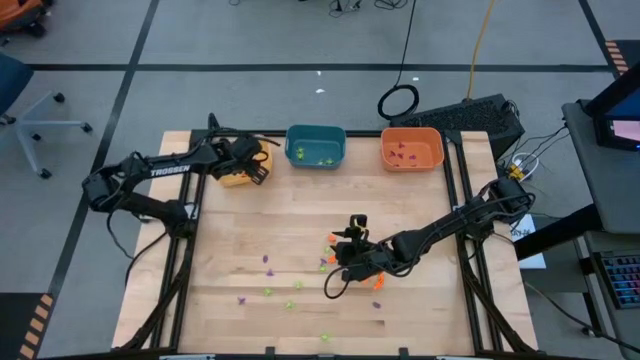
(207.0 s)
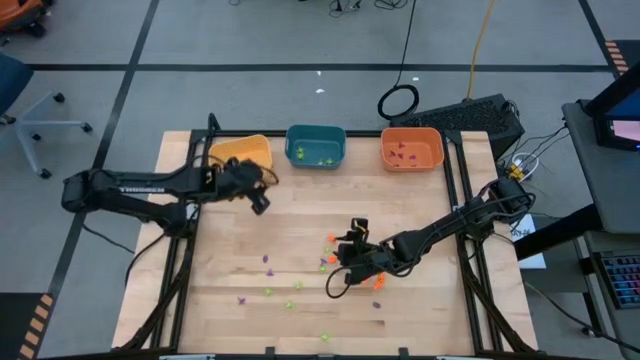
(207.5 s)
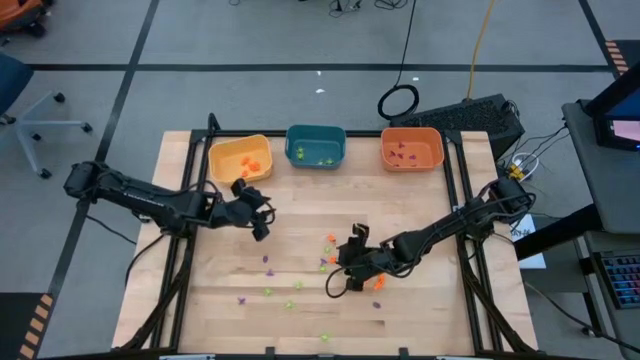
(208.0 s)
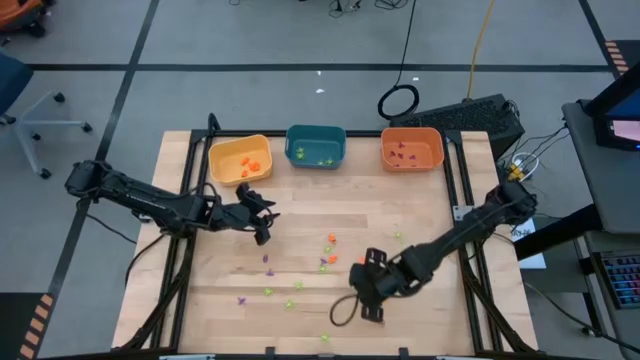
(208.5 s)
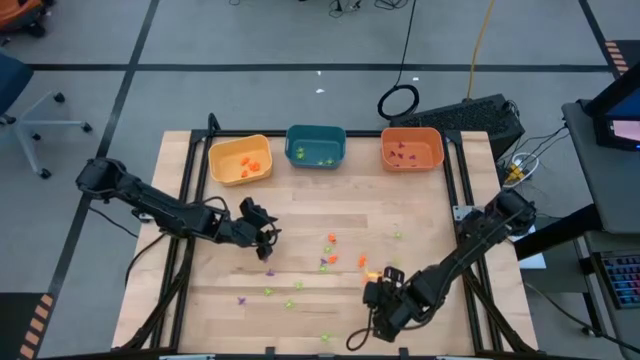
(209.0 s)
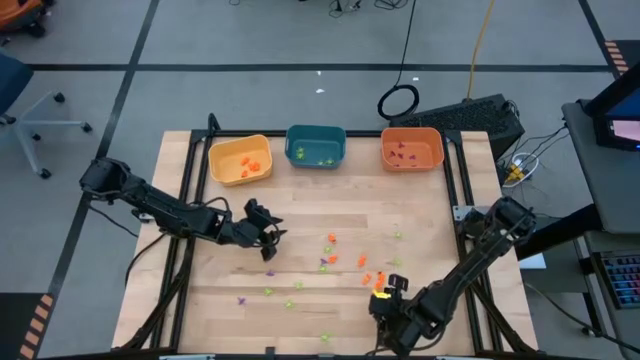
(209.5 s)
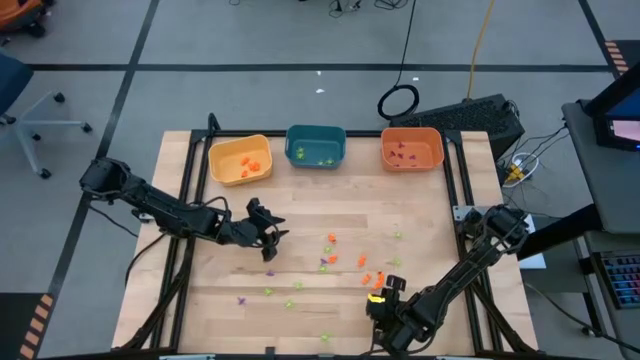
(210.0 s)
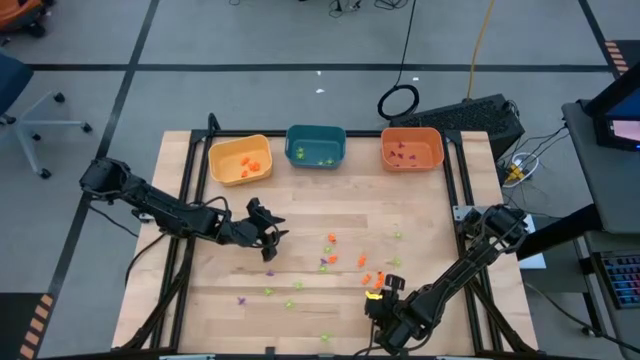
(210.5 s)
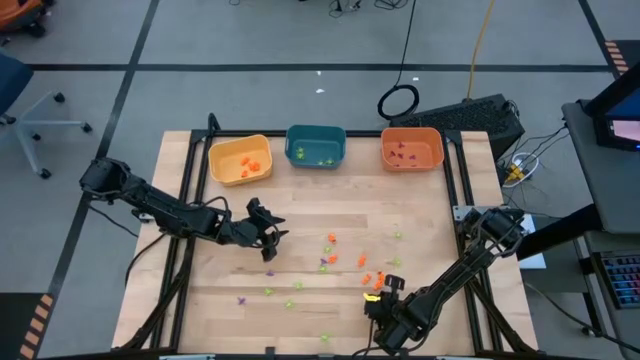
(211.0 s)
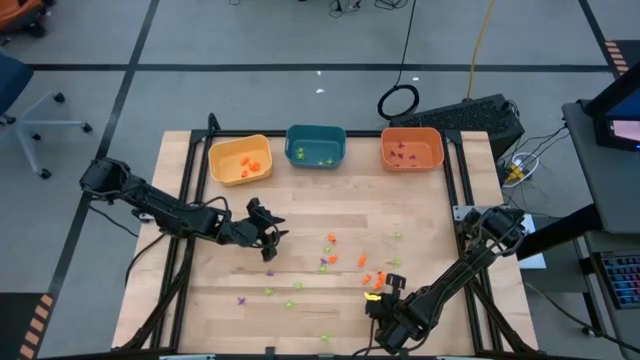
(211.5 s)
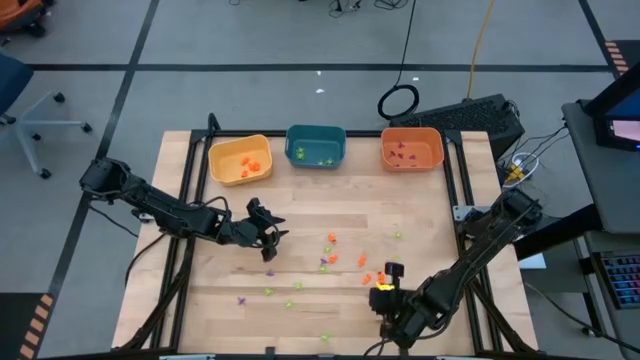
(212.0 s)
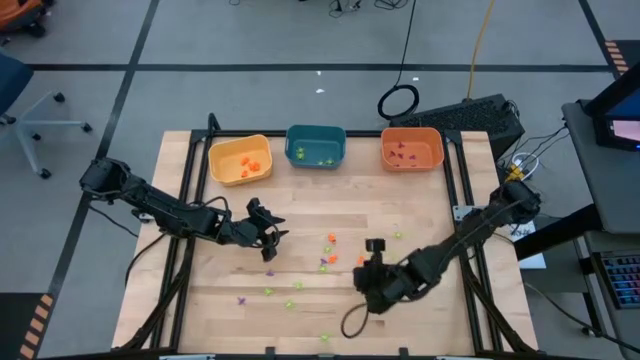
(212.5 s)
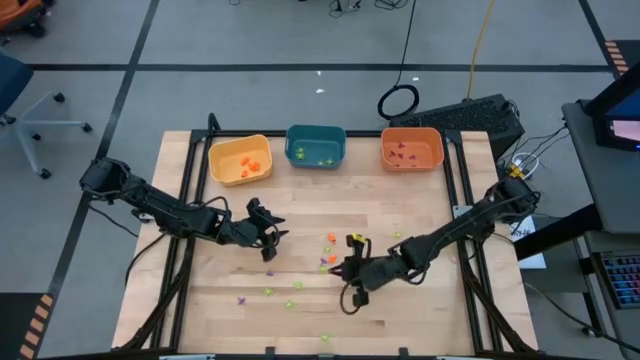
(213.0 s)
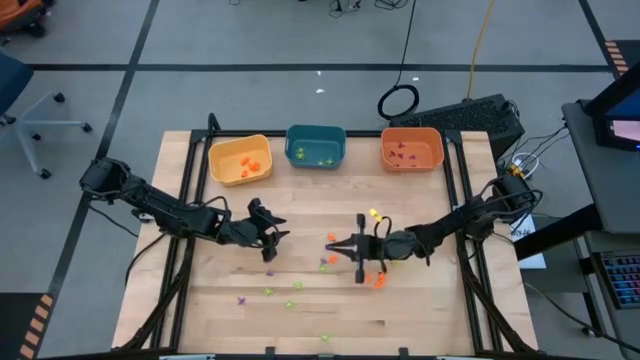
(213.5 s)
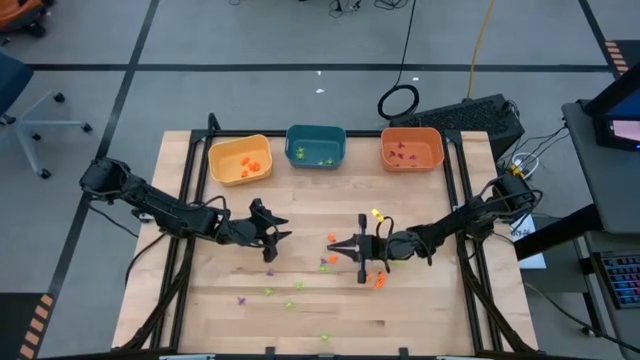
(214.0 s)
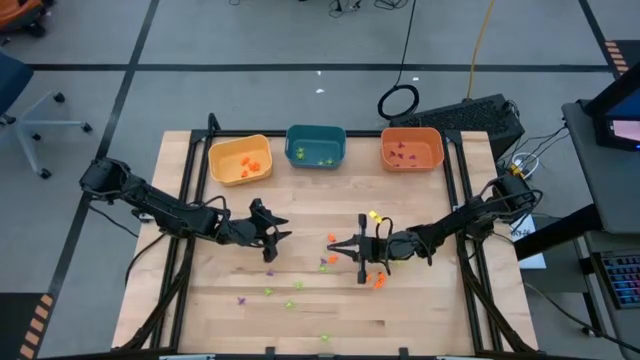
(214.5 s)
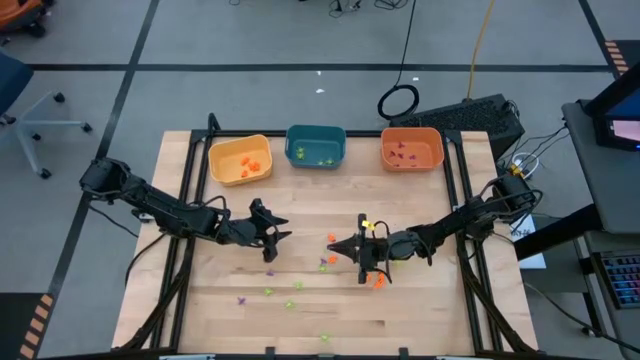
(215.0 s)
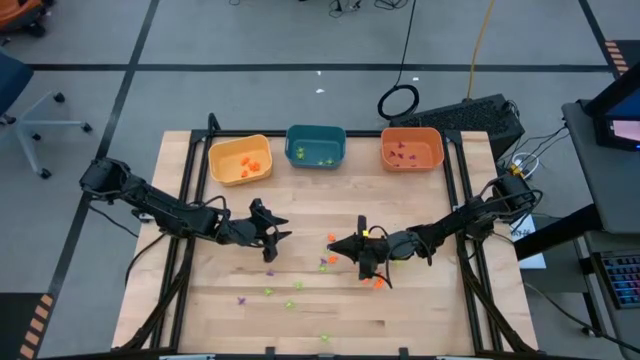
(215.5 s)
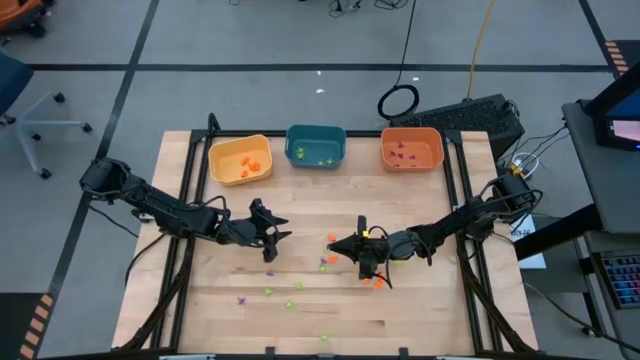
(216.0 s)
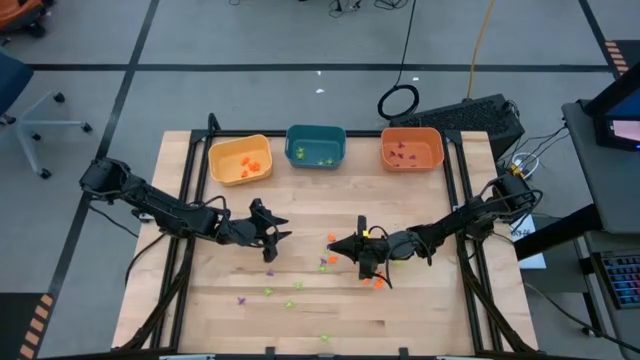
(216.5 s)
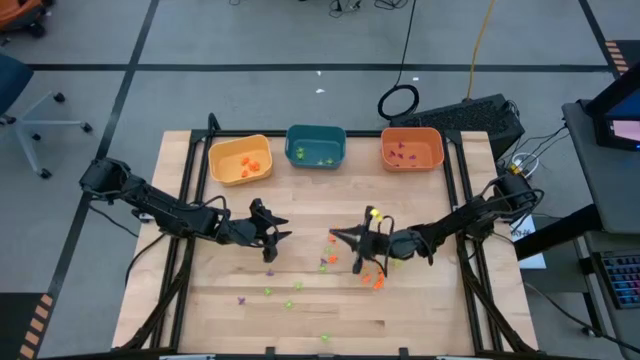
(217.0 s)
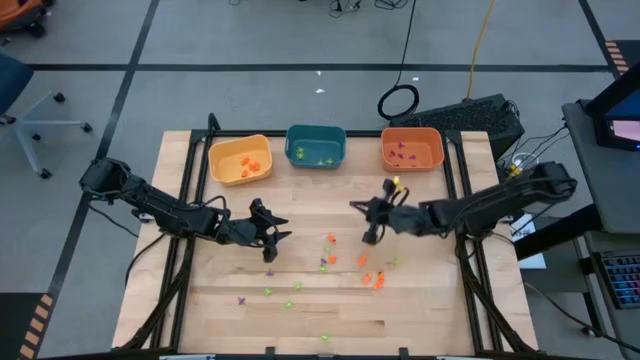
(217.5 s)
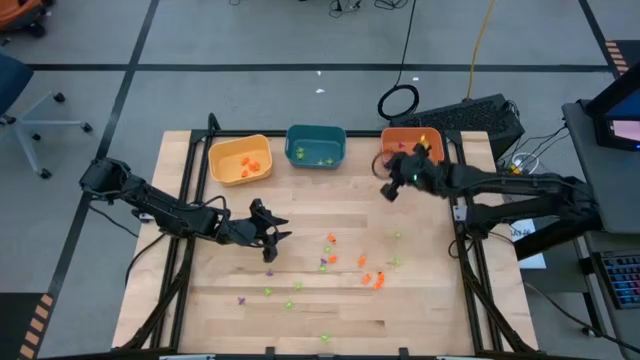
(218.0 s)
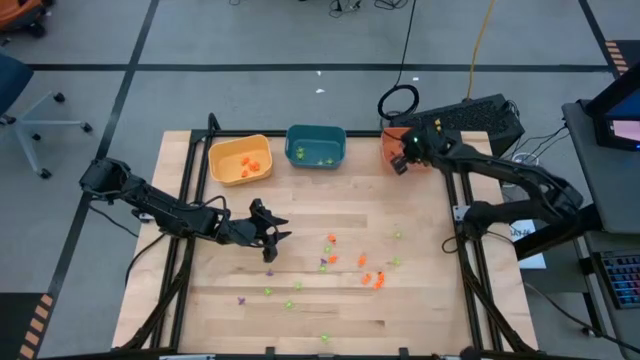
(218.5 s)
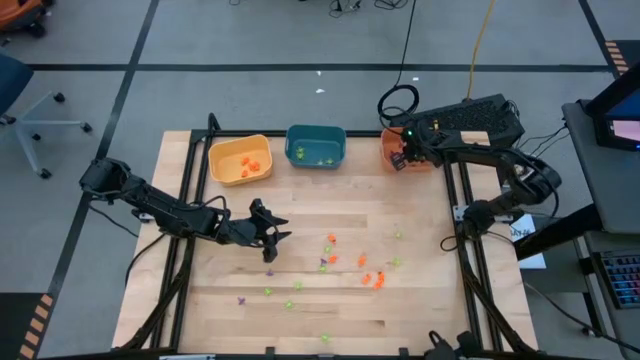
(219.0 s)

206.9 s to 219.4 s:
Task: Sort Halloween decoration
Put the violet witch hat toy into the orange bin

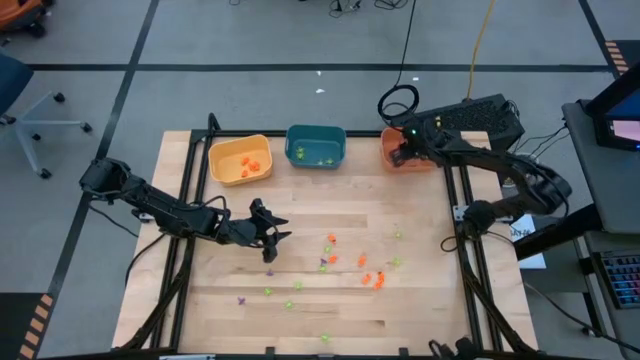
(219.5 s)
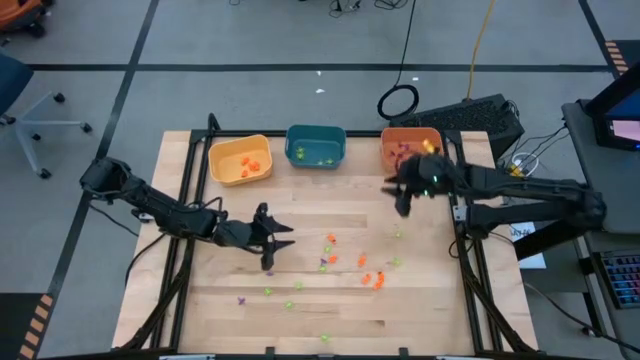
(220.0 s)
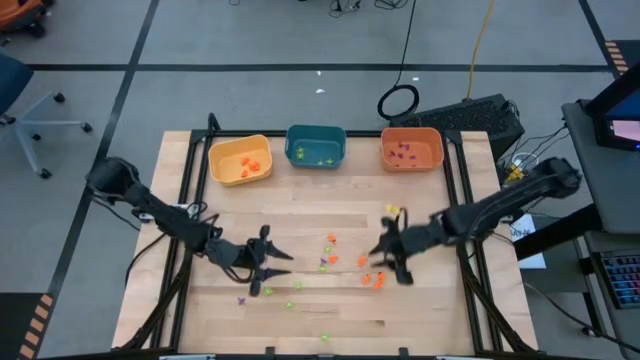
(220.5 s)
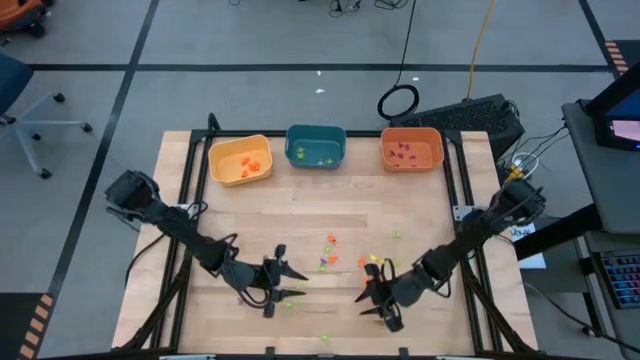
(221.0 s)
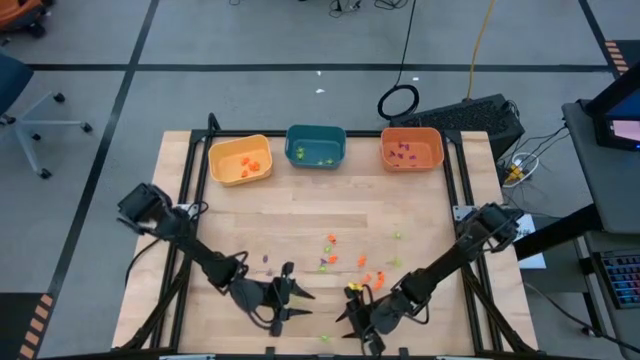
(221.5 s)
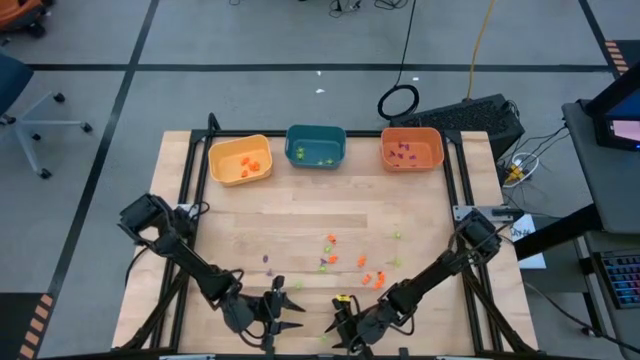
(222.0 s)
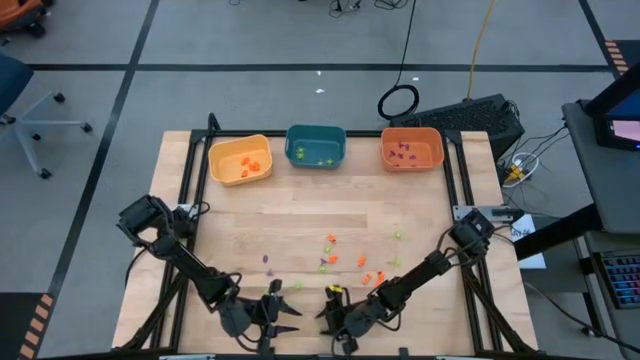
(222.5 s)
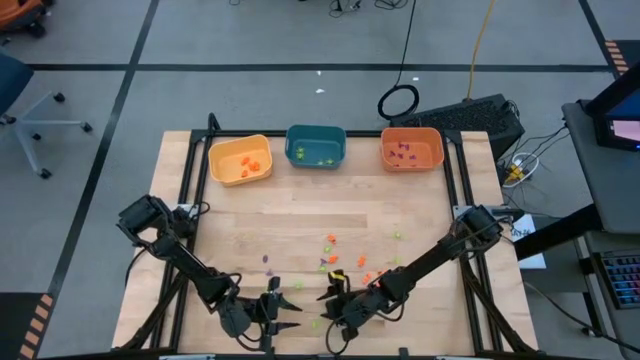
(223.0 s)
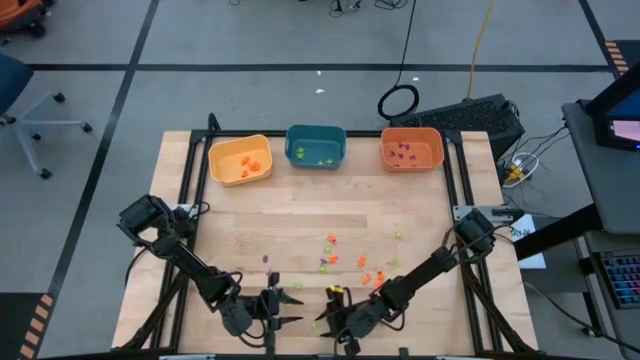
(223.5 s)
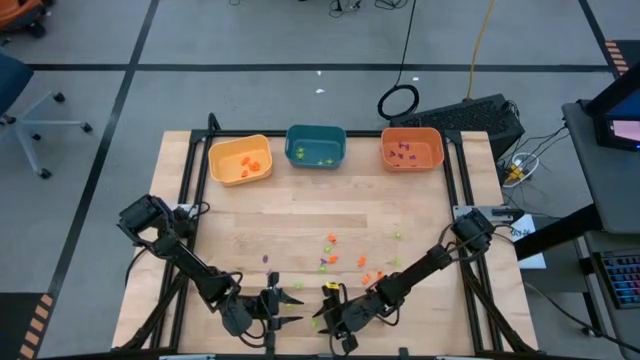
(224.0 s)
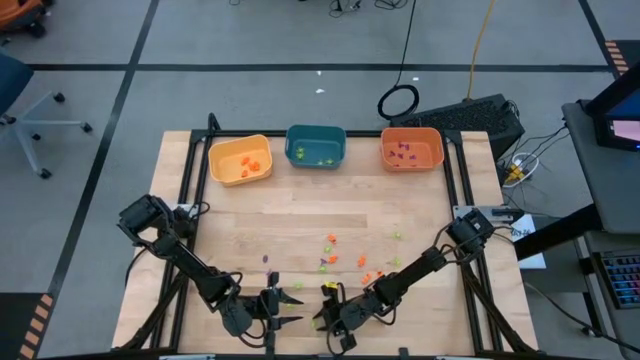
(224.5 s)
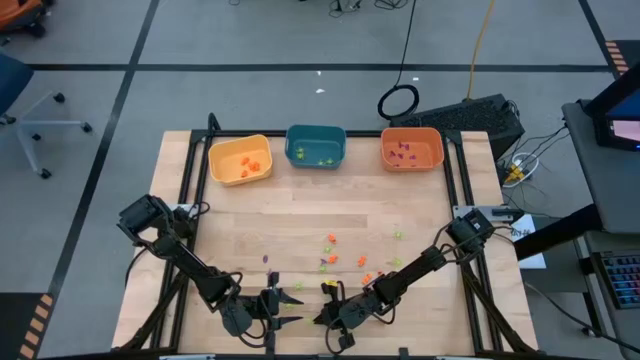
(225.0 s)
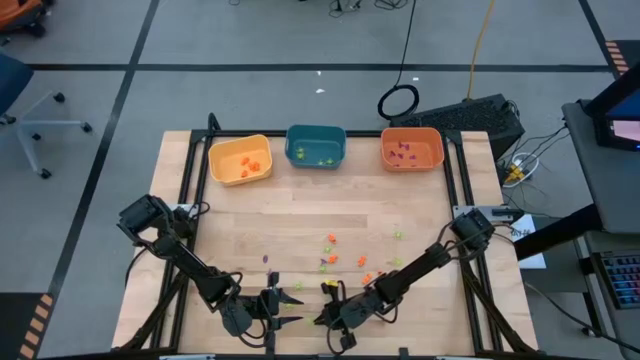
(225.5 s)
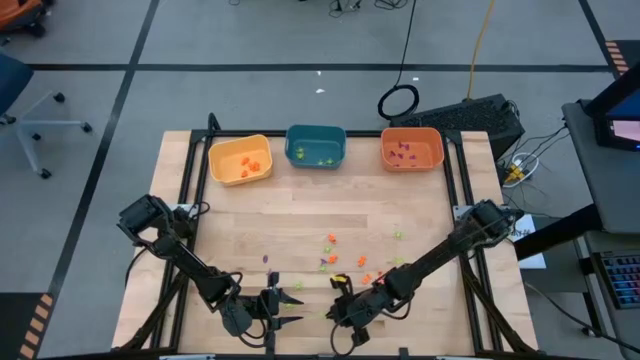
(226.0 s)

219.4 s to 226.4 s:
Put the green spider toy into the blue bin
